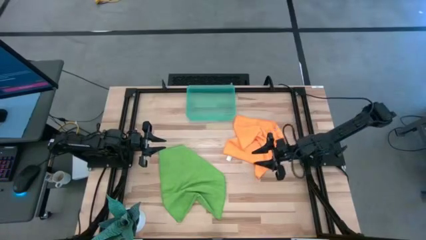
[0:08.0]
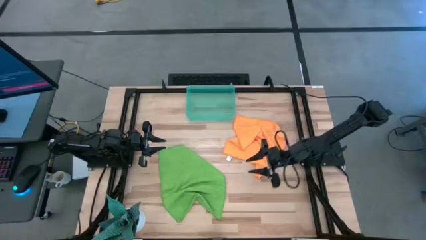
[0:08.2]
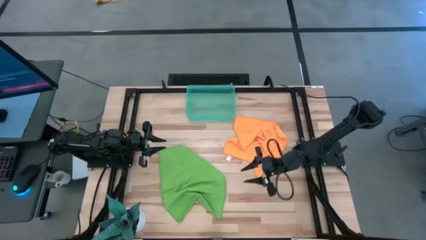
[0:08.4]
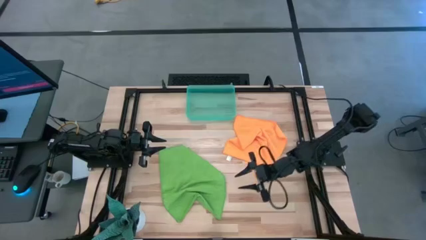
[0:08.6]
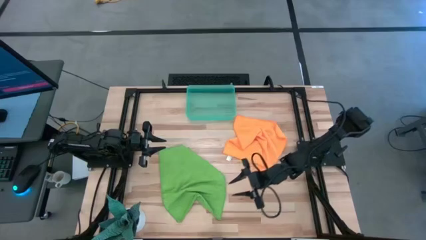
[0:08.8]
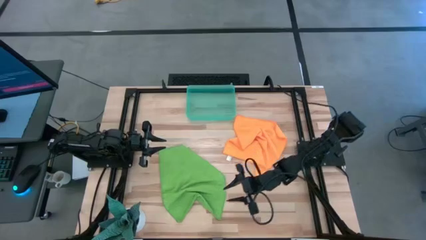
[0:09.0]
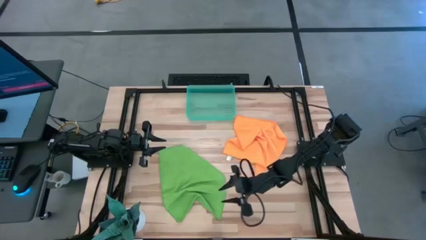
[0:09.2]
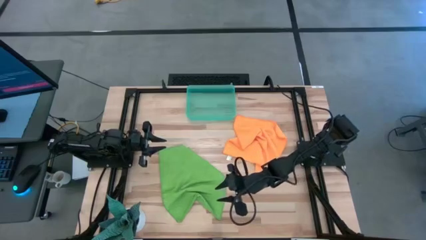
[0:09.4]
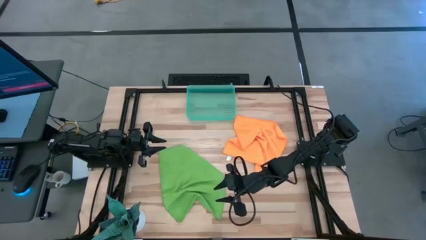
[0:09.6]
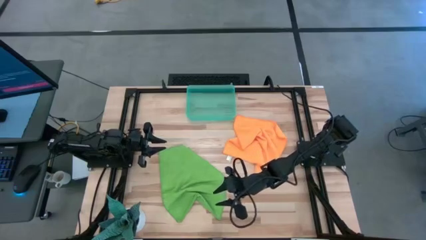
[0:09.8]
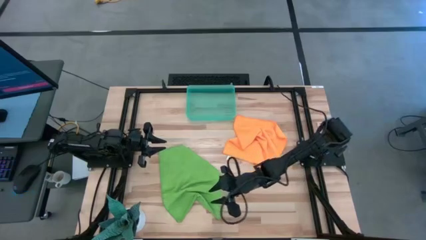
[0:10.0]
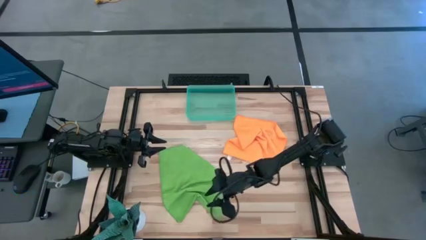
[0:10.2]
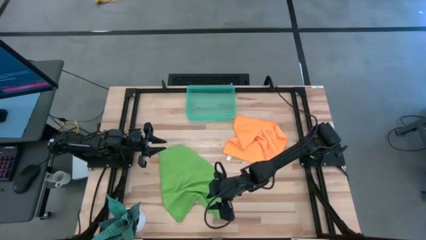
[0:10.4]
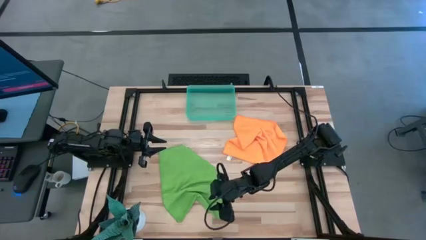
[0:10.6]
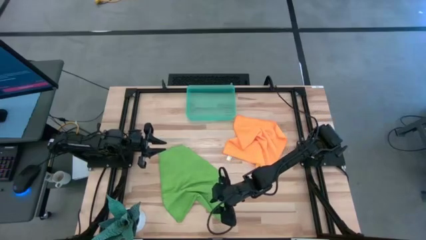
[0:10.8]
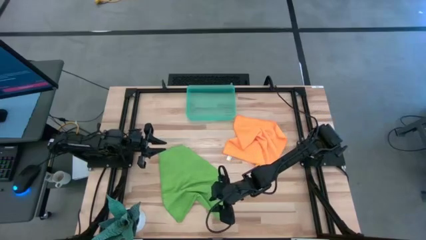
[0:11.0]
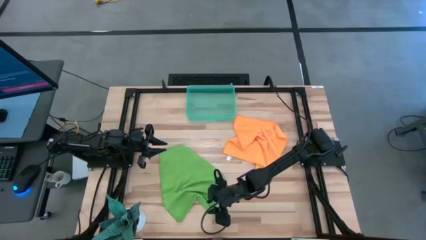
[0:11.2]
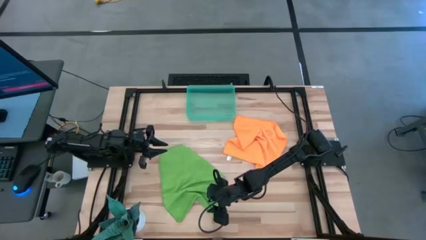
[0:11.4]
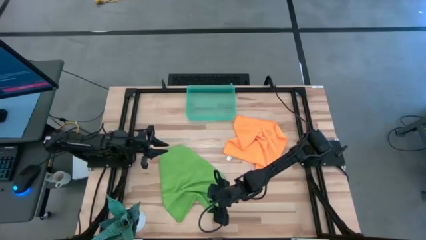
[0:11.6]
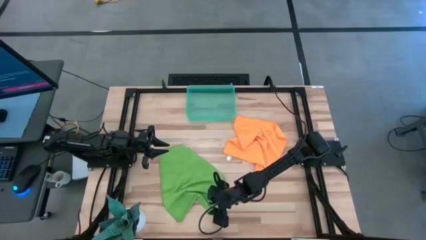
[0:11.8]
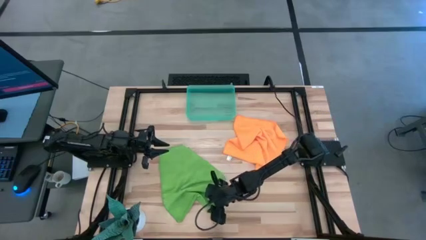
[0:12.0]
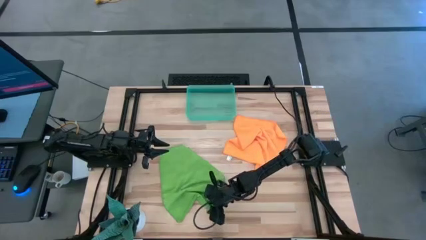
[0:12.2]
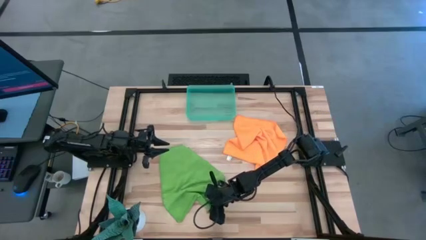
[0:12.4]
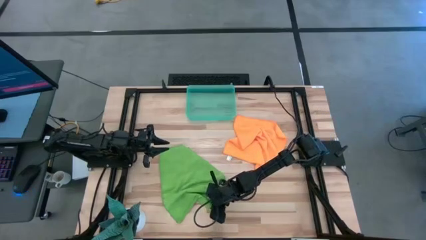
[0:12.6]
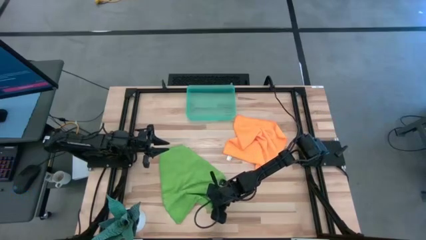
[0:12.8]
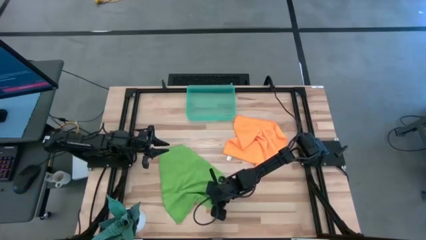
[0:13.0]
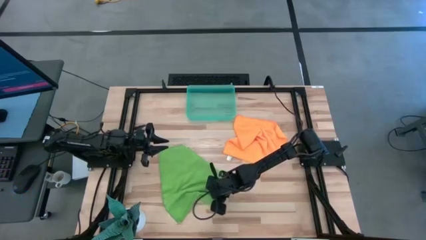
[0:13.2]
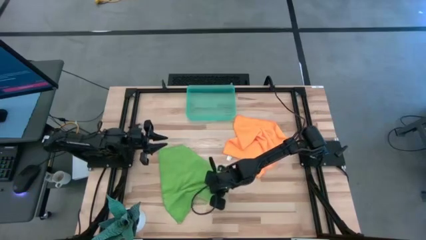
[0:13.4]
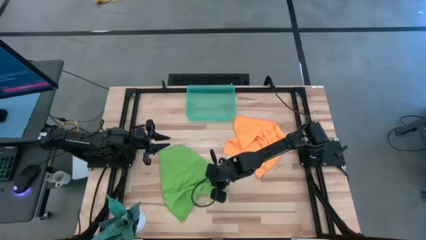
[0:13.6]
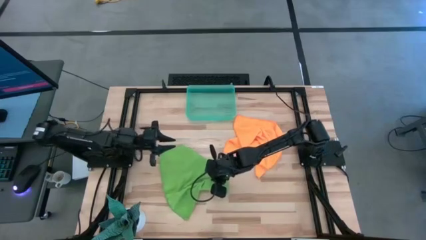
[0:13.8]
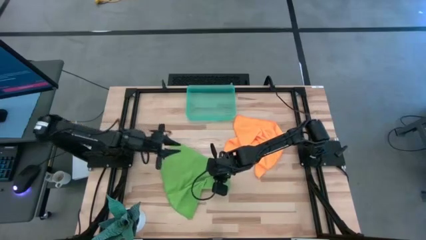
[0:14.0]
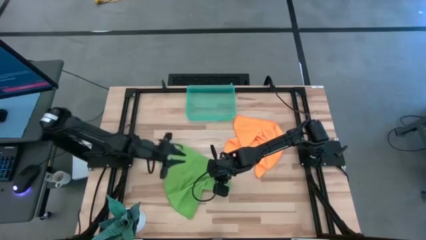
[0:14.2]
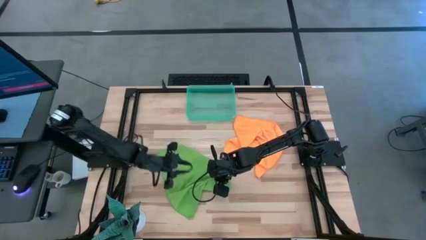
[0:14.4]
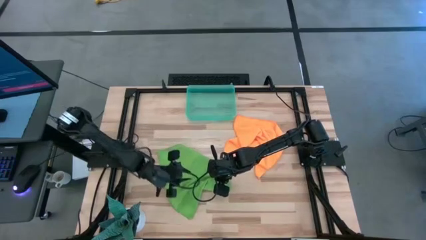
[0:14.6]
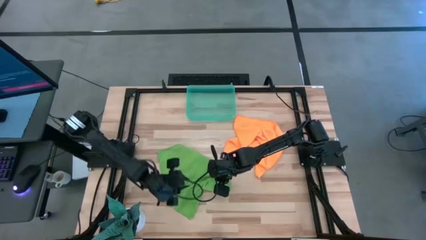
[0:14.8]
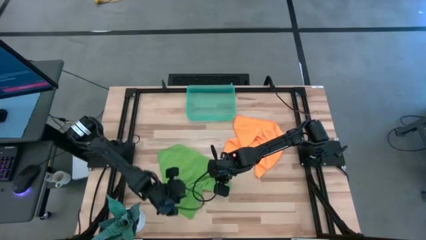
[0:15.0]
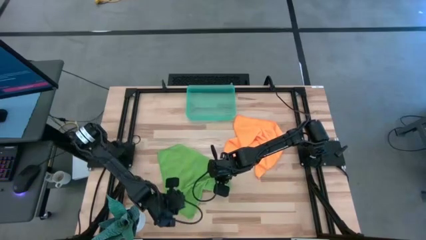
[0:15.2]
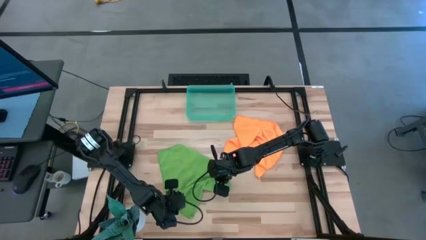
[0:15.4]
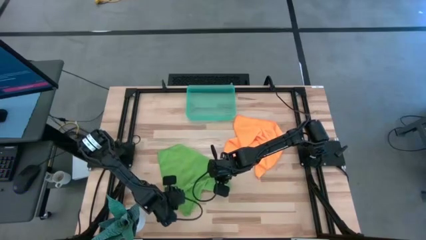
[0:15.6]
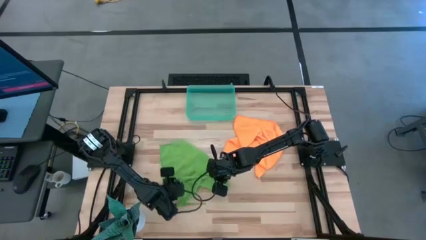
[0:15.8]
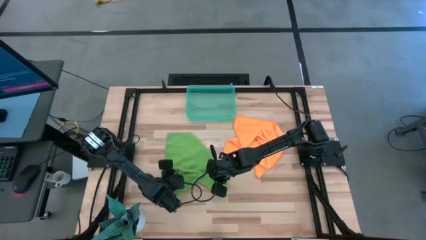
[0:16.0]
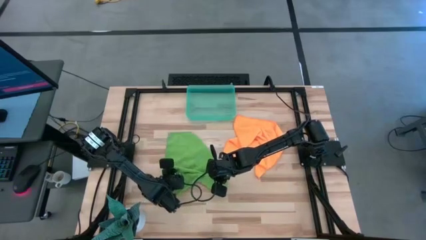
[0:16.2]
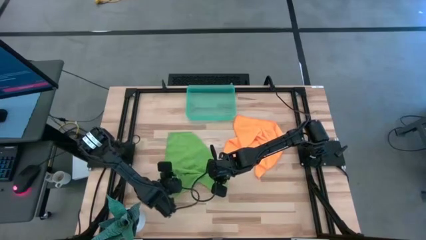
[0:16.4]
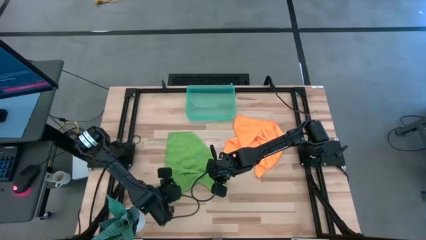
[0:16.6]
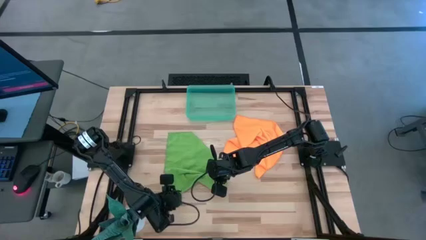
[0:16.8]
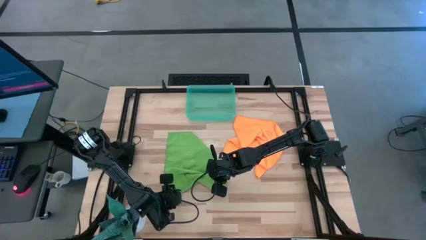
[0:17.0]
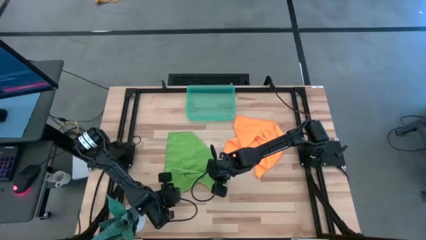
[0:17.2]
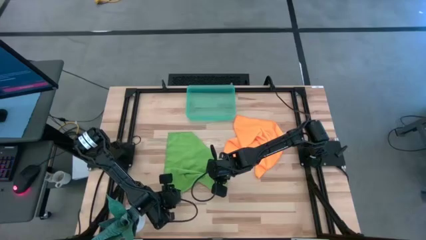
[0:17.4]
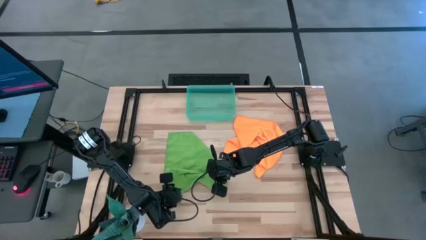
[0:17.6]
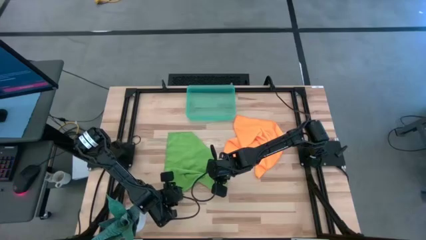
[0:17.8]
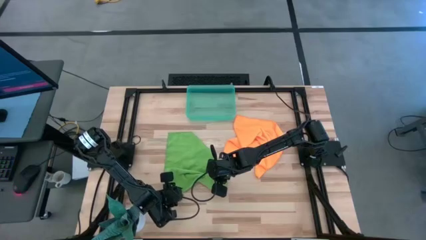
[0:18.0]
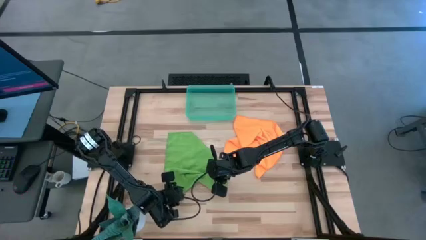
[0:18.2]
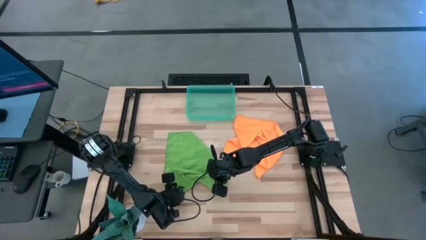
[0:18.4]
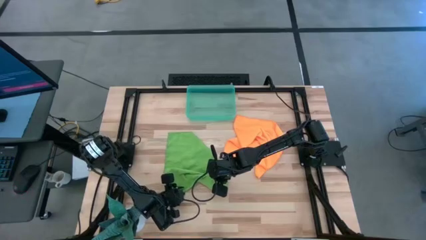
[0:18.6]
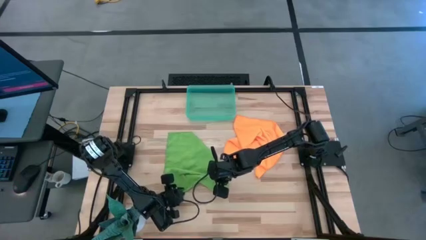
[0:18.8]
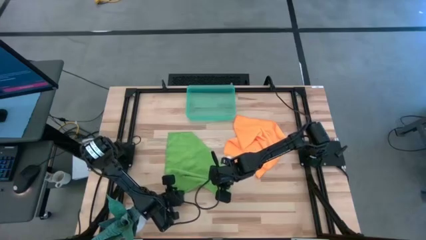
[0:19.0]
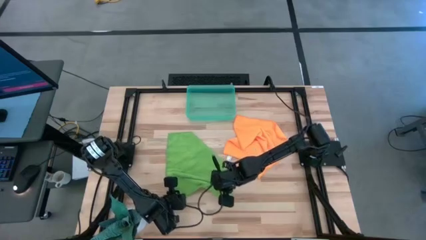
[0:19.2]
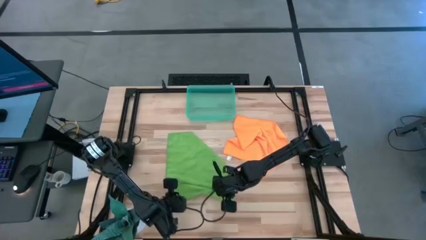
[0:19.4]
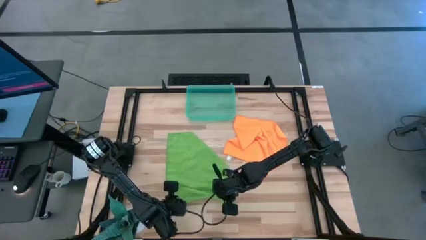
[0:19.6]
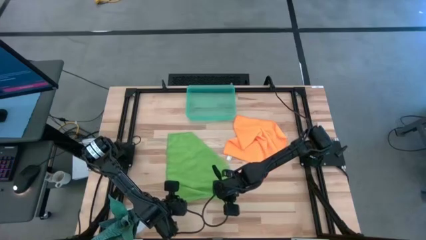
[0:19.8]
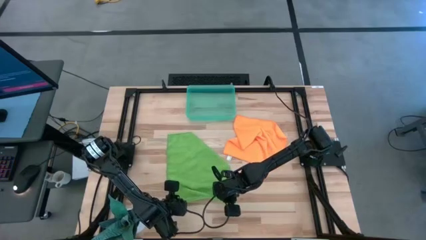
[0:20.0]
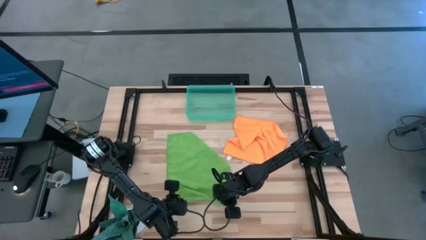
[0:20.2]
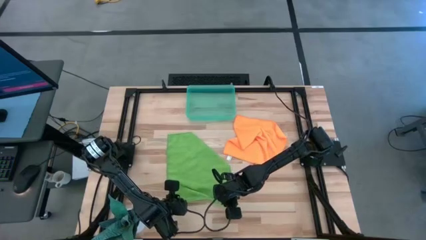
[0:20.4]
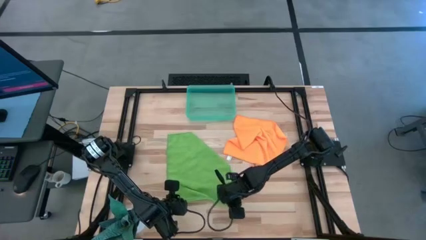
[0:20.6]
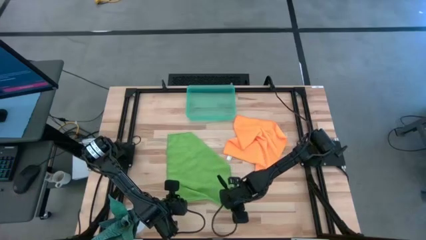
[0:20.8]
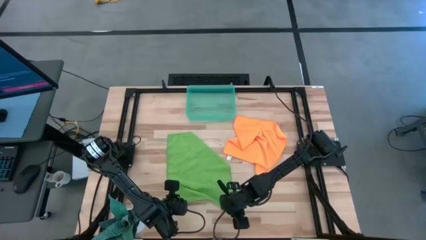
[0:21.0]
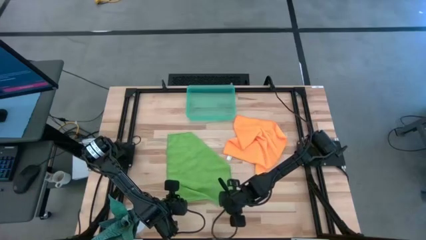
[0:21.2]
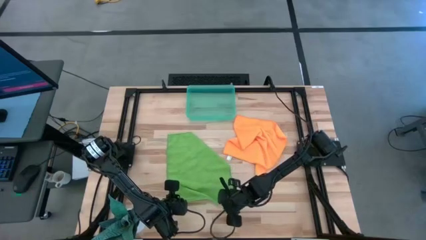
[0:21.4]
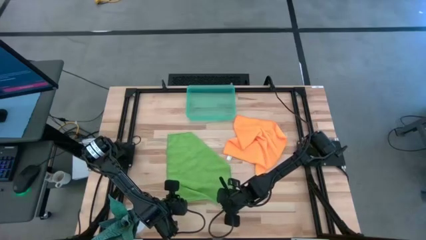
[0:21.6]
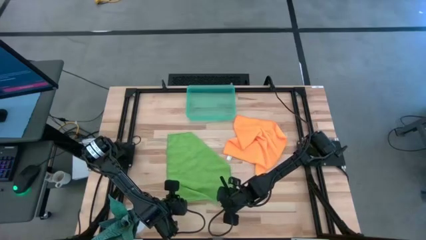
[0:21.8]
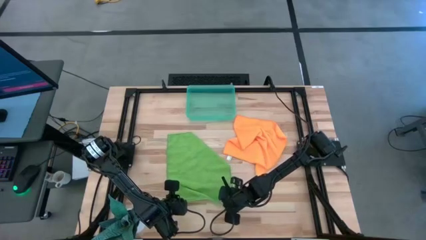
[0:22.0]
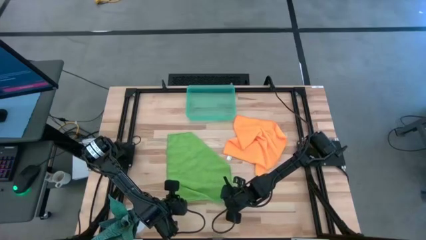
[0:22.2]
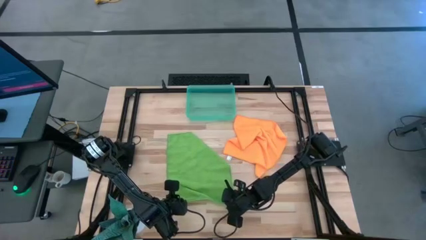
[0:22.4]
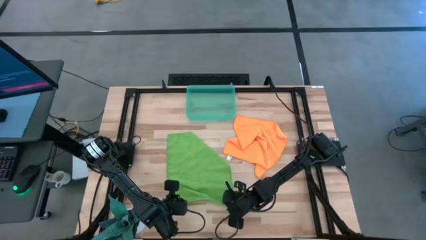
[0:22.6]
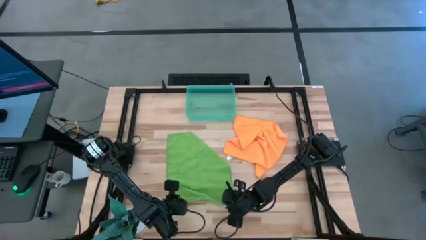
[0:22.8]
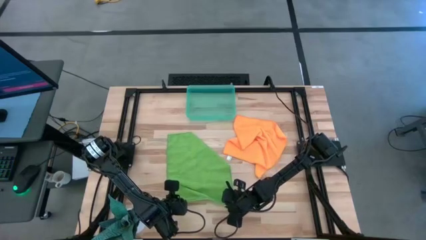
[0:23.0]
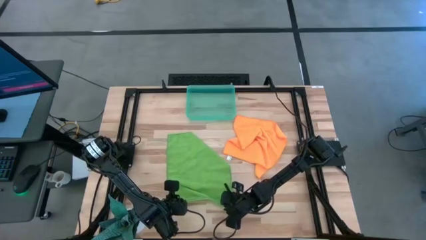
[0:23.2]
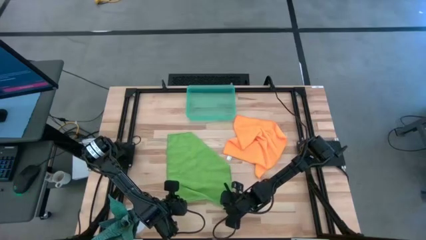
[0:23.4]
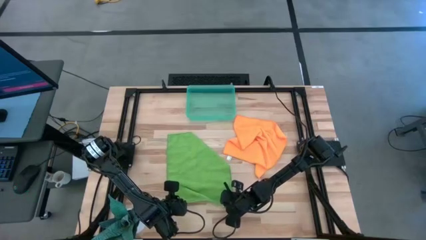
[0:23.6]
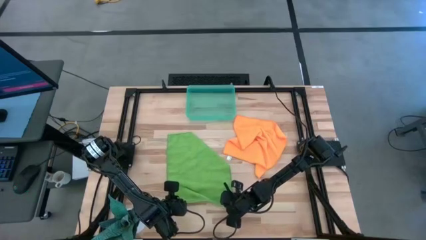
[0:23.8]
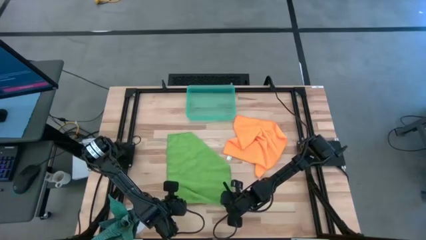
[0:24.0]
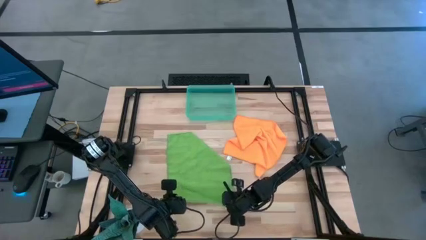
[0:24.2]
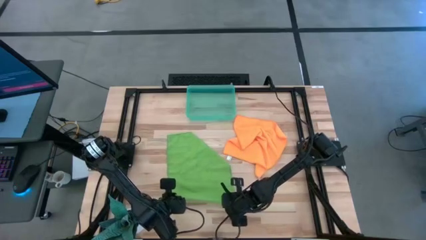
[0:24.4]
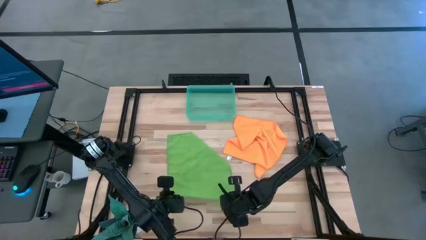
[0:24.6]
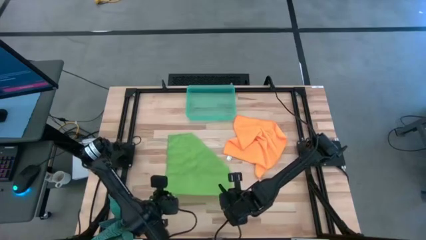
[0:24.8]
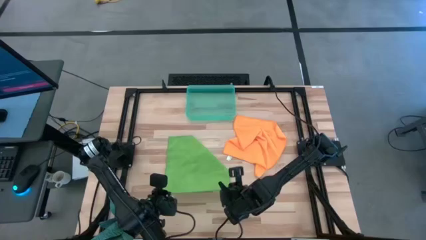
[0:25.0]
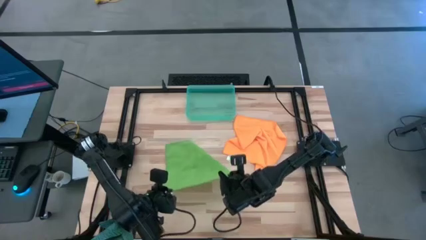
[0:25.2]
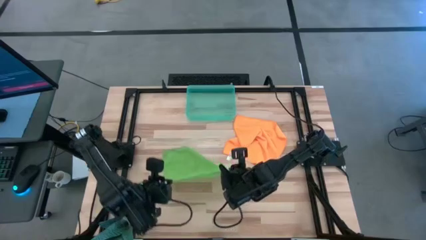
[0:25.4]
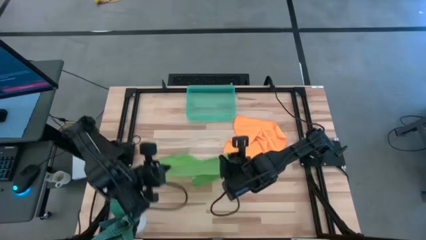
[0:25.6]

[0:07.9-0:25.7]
Task: Roll microfiber towels into tight, uniform cylinder then place into a basket
Fold the green towel
